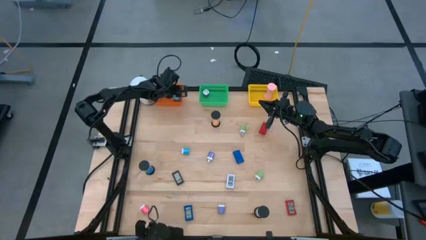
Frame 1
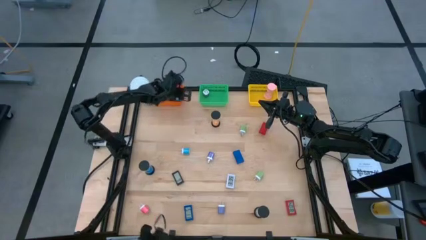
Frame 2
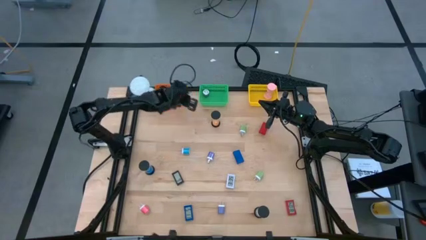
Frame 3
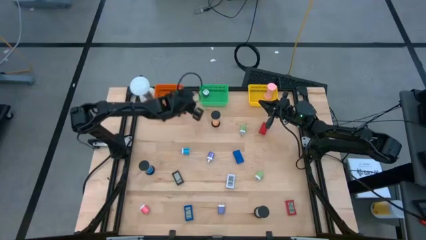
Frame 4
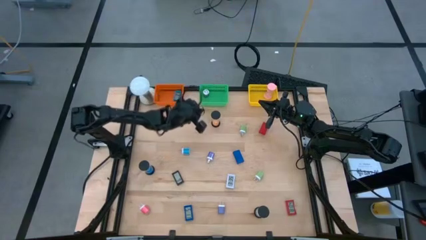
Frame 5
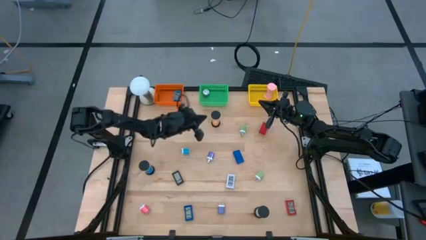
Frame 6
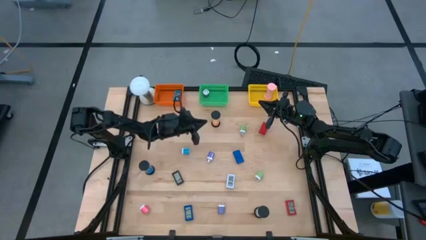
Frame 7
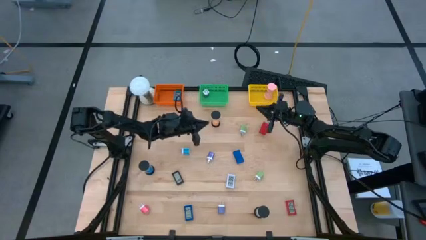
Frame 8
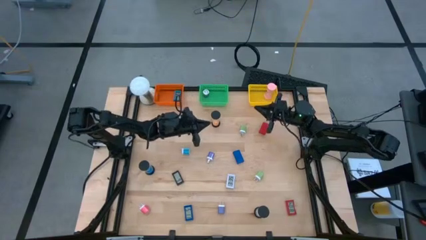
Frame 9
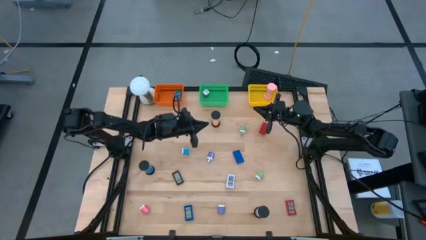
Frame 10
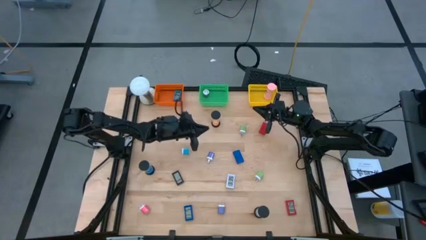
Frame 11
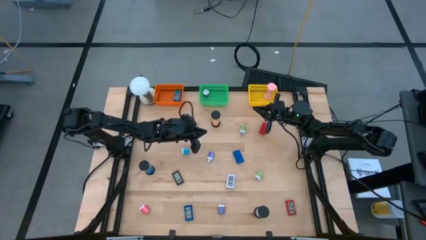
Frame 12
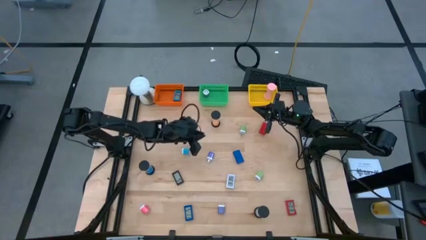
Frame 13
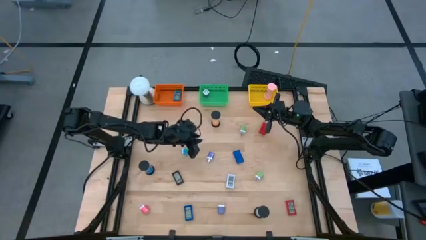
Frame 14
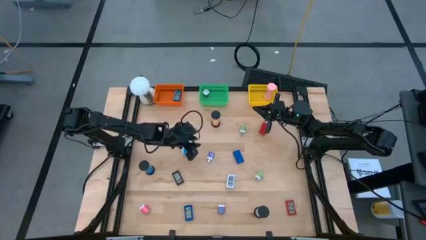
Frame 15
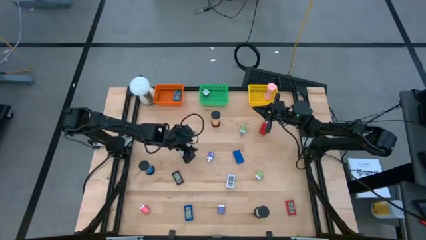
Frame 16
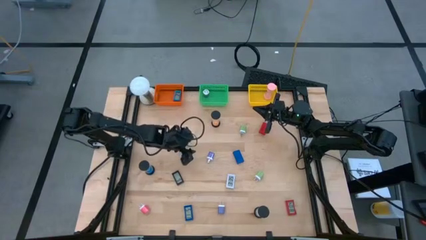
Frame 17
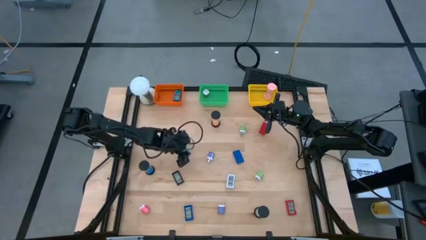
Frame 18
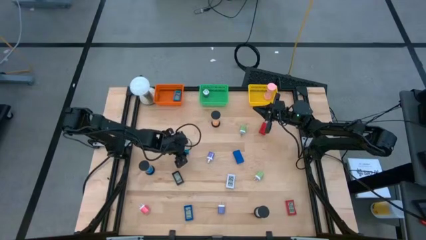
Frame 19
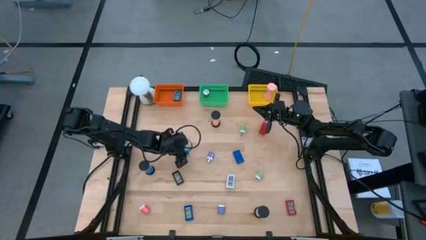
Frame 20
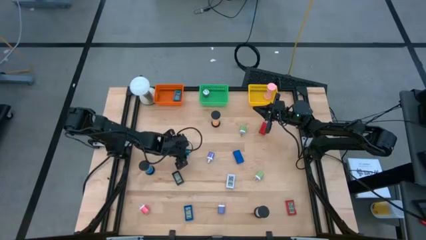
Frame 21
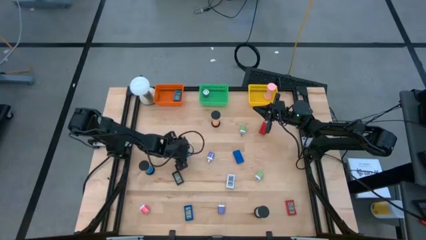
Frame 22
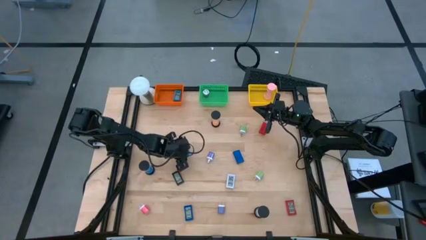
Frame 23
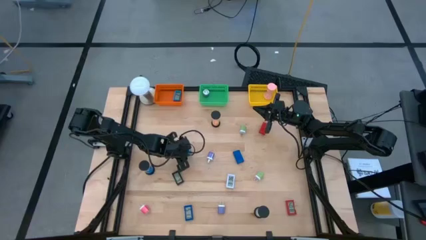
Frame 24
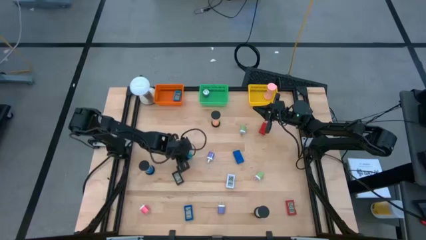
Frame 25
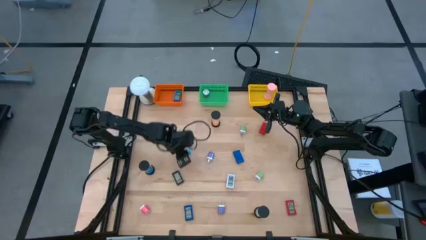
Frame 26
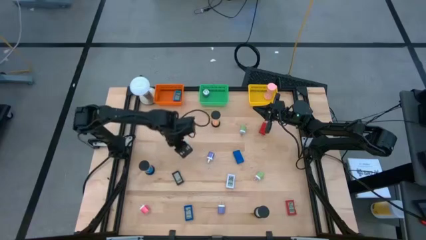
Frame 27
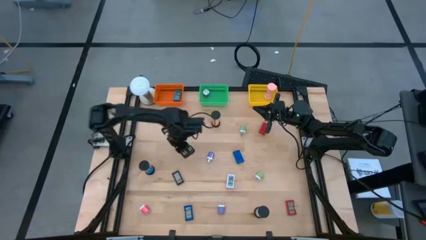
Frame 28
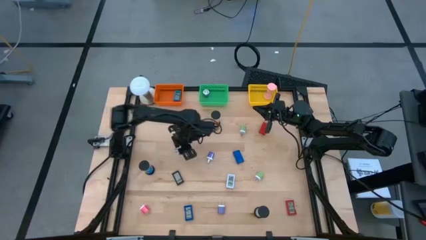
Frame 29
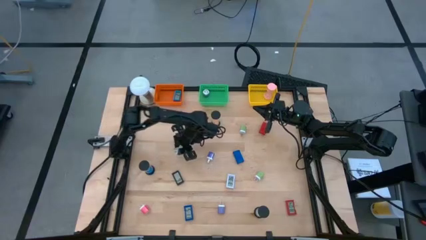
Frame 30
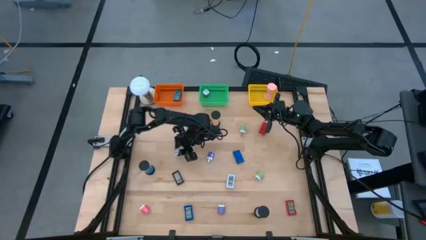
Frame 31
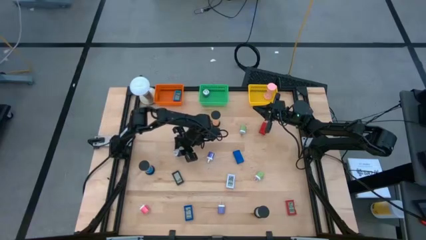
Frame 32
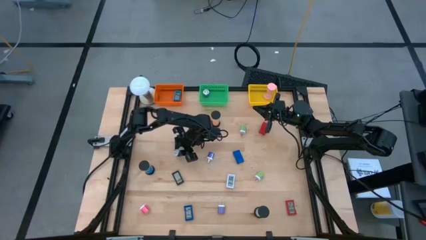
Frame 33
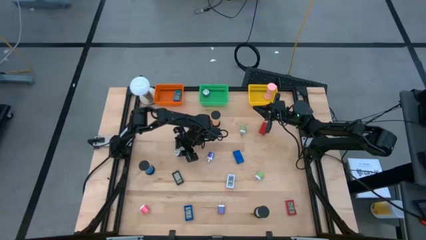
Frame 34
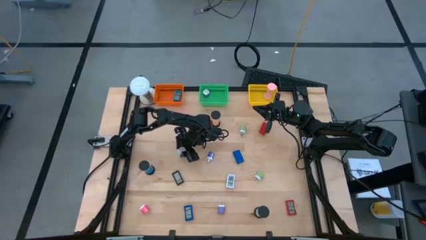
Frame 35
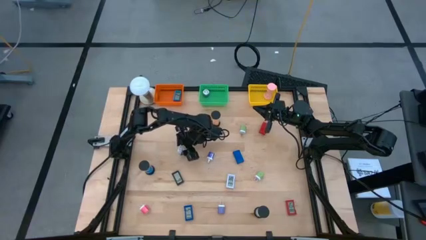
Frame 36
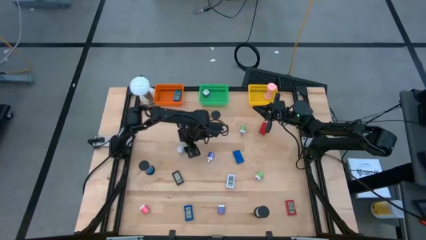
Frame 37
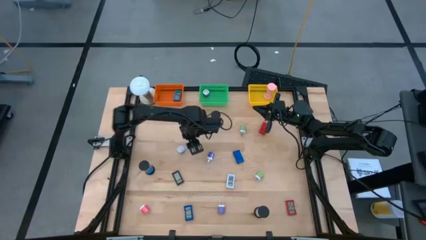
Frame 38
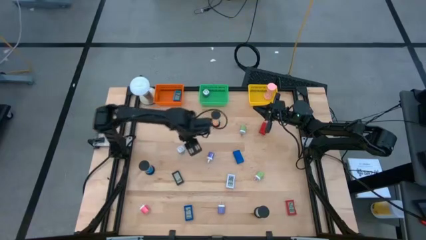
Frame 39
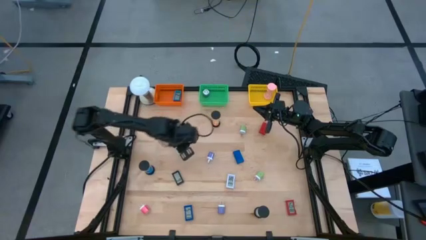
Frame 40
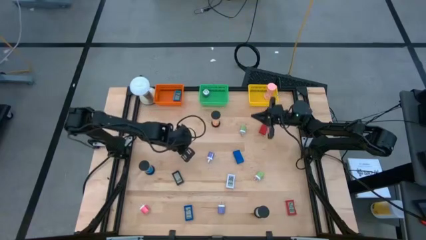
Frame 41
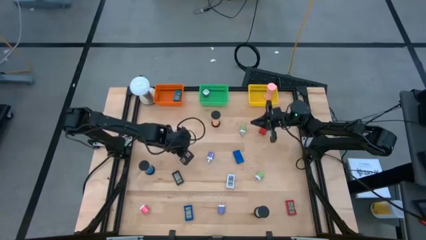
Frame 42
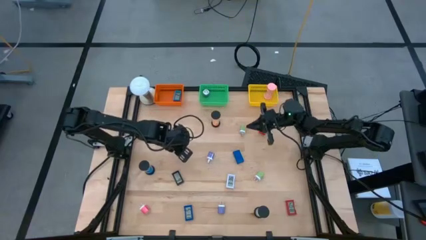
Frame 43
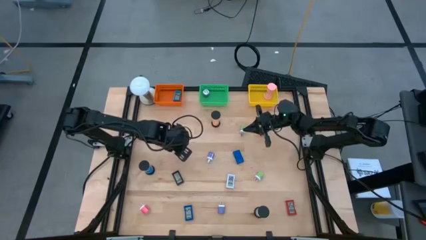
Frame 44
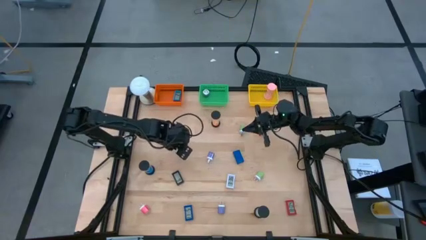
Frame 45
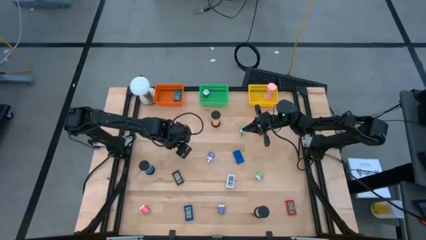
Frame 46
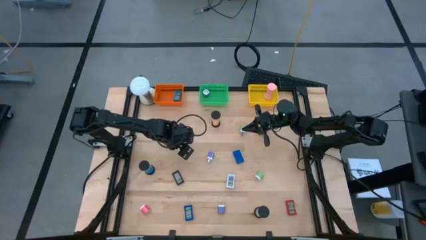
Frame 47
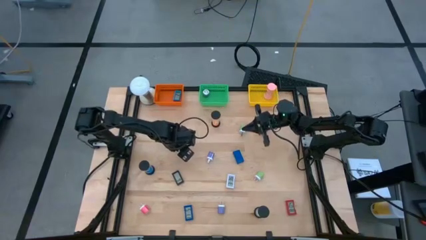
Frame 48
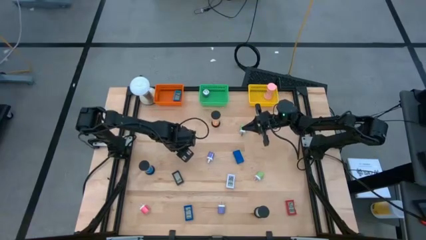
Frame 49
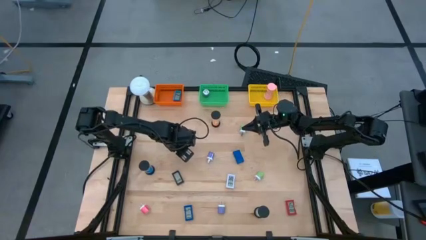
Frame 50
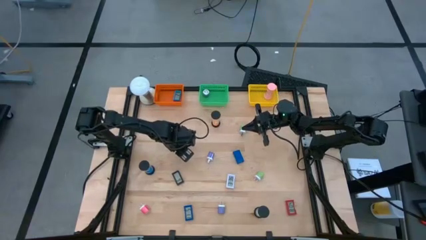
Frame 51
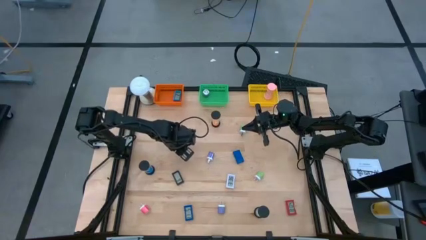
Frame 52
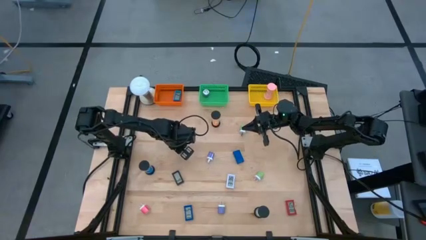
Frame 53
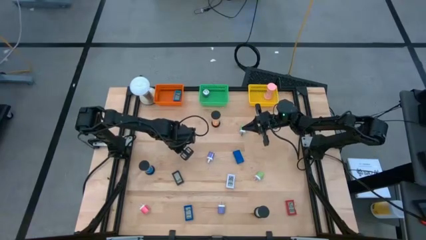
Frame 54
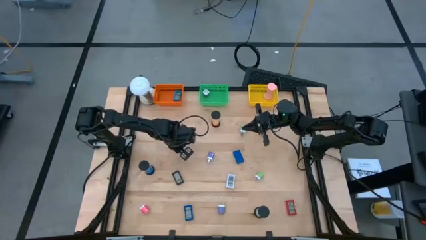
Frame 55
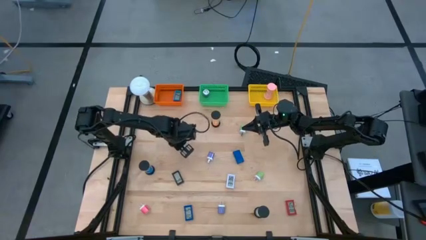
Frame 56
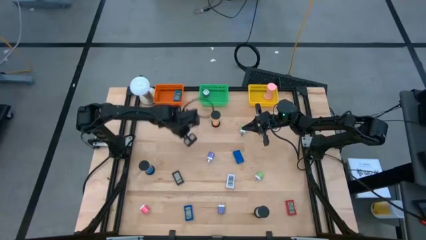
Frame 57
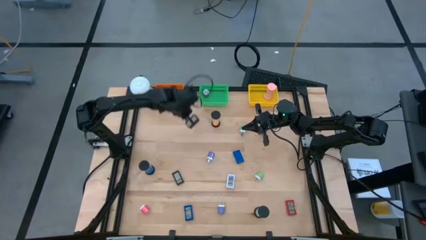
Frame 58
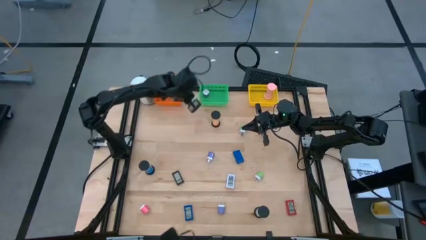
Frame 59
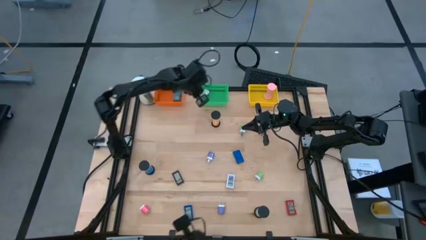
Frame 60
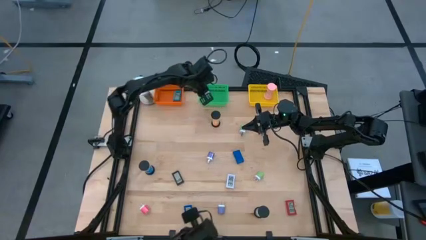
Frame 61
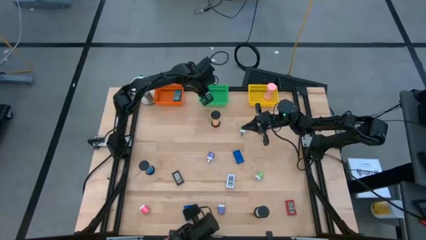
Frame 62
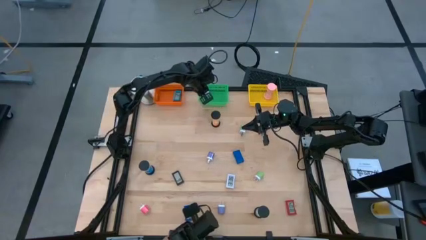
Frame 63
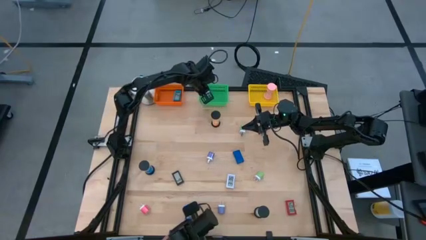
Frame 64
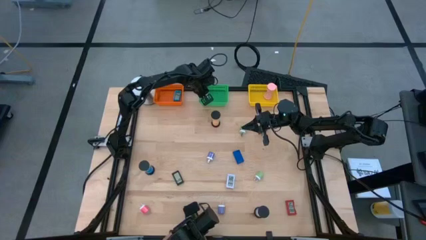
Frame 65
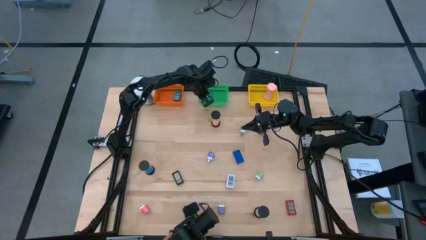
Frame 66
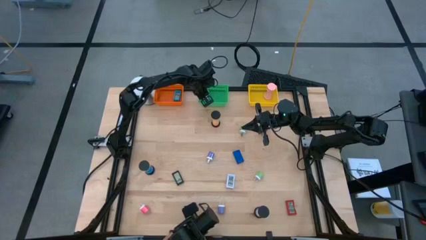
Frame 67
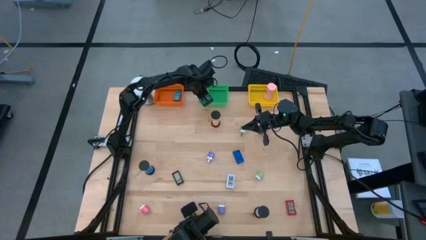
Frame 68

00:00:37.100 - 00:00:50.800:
Task: Pick & Place Office items
Put the light blue charger adapter into the green basket

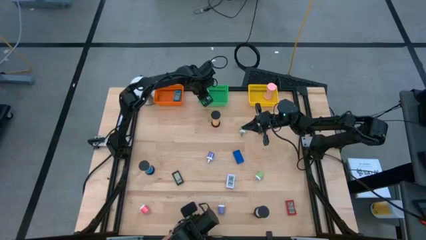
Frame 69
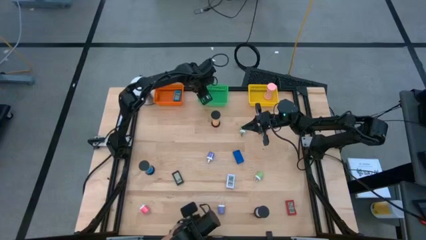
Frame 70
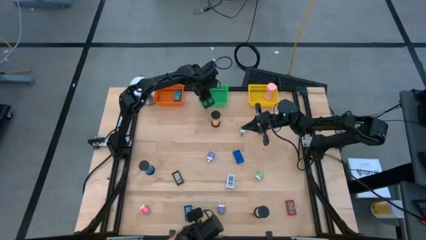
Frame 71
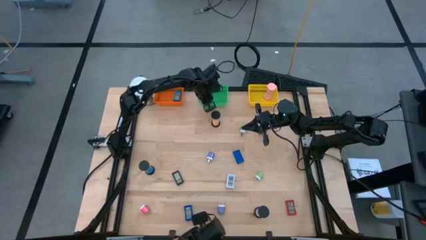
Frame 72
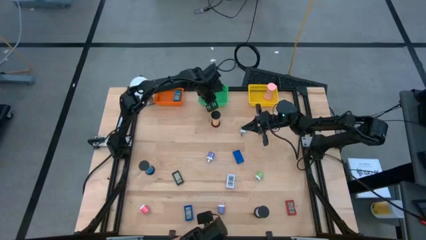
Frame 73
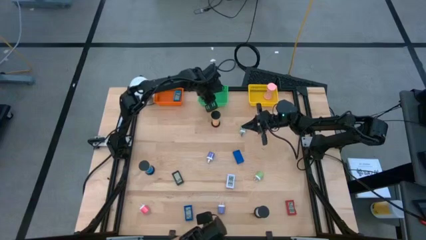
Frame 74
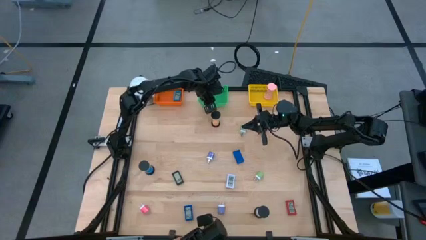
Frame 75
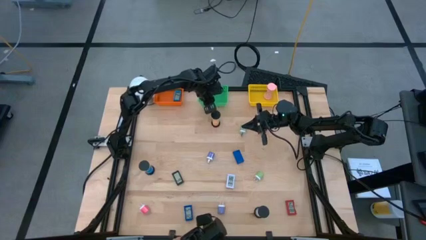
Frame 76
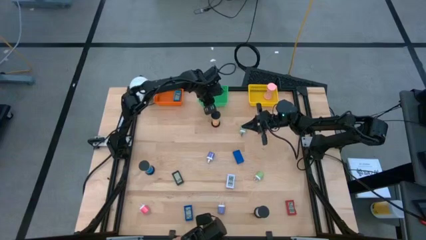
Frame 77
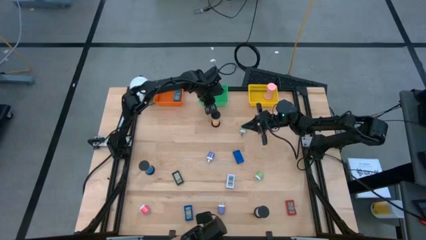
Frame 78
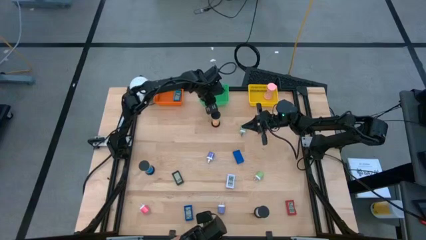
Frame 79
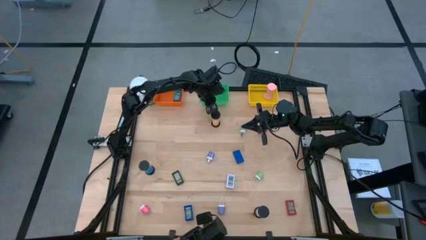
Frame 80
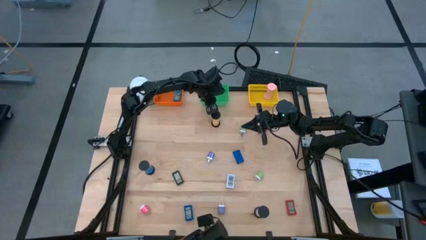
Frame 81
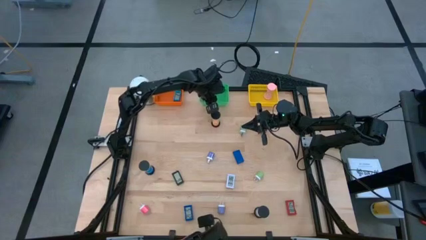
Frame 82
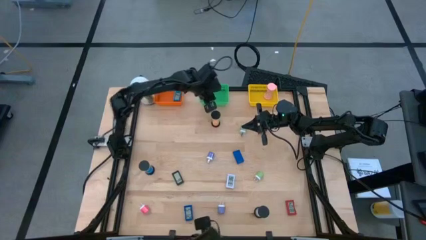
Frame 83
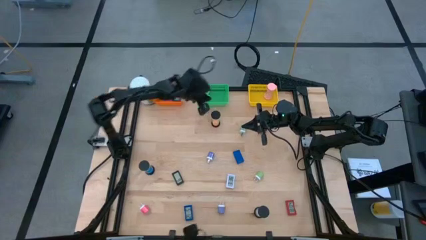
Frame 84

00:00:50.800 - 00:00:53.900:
Adjust the green basket
